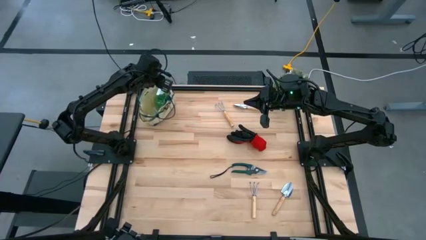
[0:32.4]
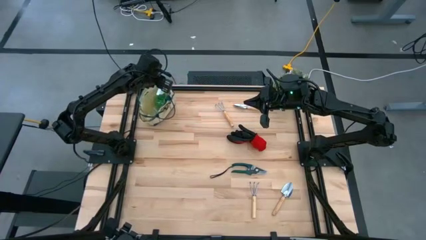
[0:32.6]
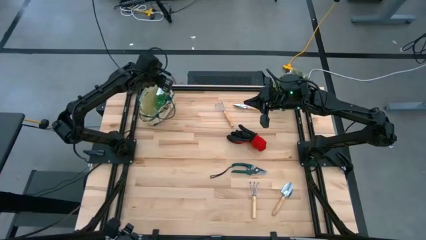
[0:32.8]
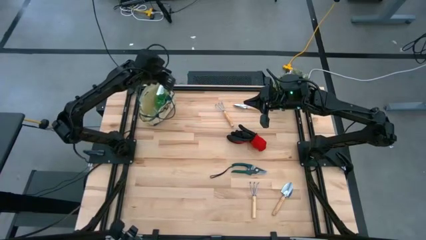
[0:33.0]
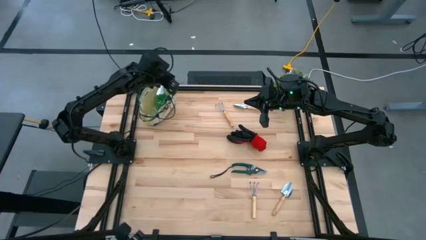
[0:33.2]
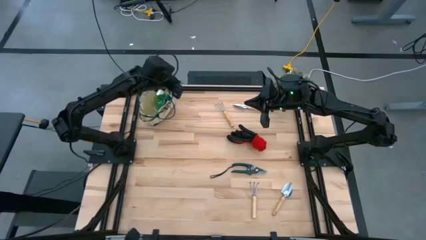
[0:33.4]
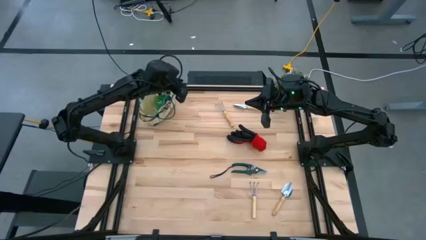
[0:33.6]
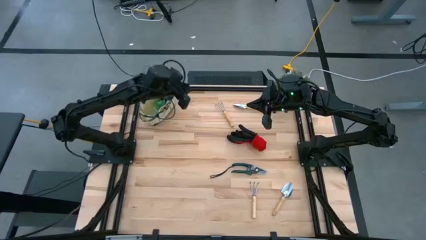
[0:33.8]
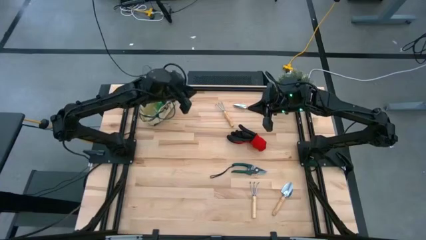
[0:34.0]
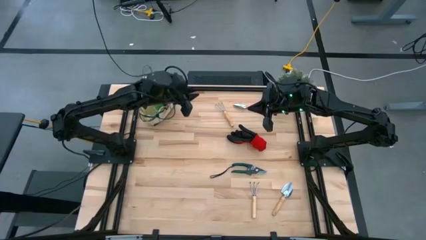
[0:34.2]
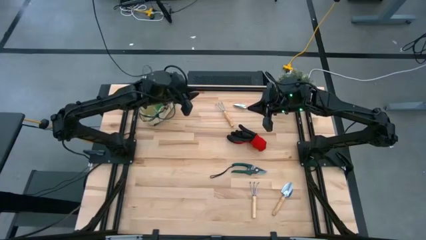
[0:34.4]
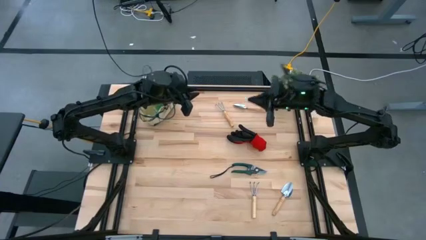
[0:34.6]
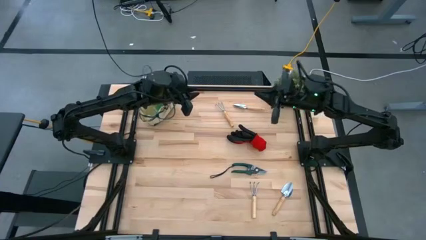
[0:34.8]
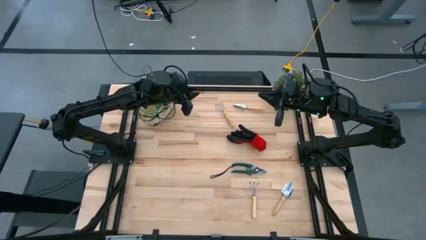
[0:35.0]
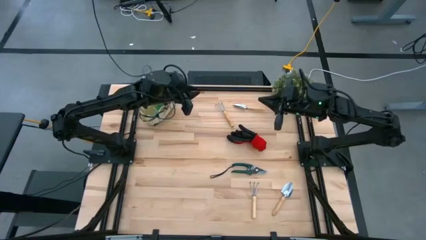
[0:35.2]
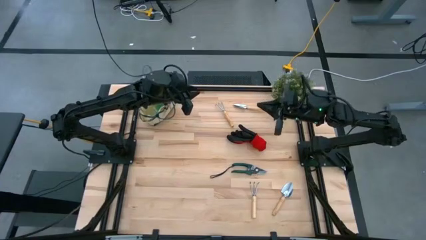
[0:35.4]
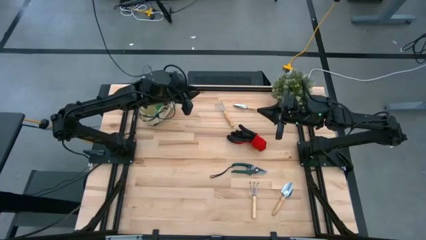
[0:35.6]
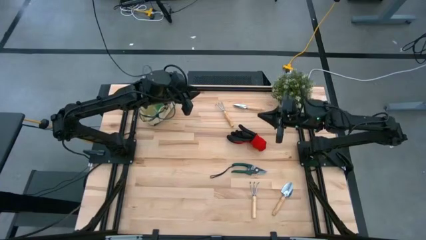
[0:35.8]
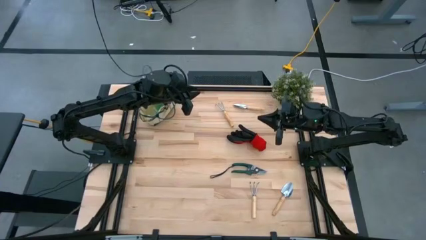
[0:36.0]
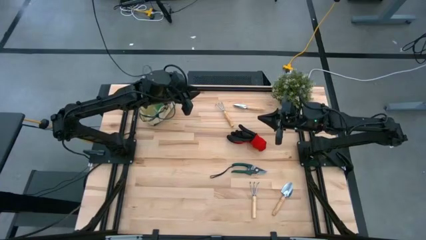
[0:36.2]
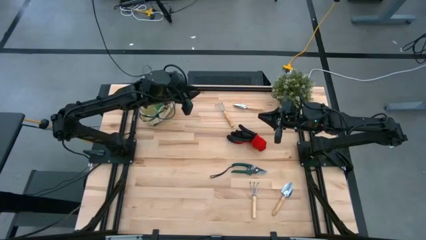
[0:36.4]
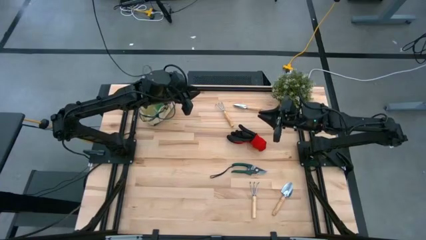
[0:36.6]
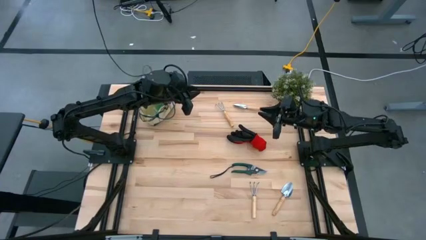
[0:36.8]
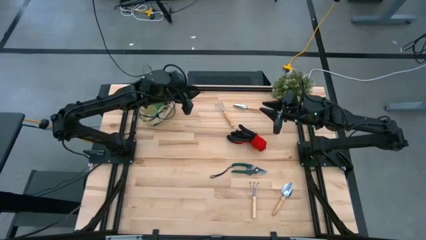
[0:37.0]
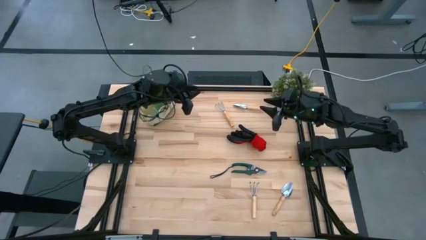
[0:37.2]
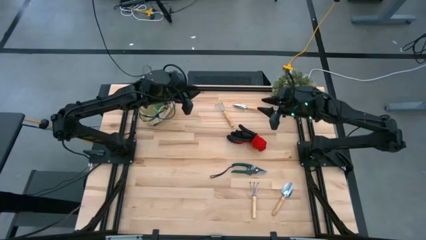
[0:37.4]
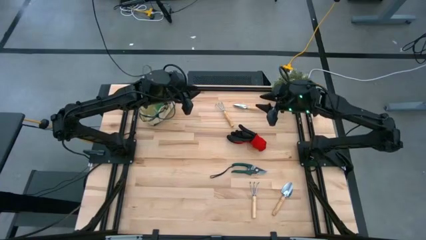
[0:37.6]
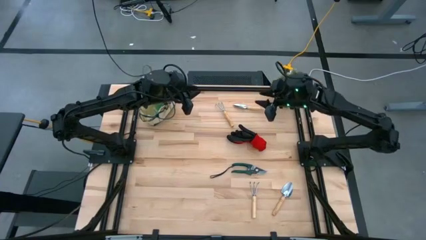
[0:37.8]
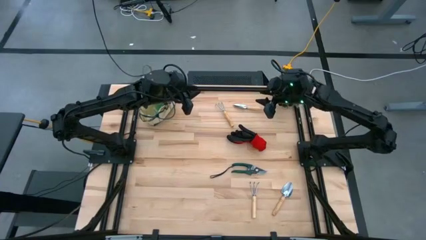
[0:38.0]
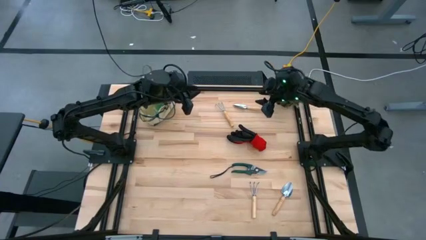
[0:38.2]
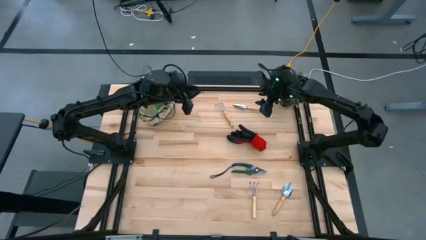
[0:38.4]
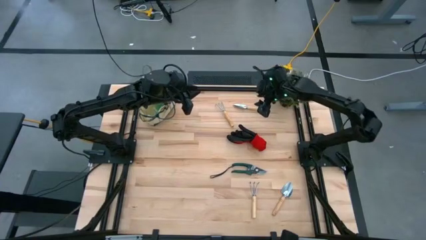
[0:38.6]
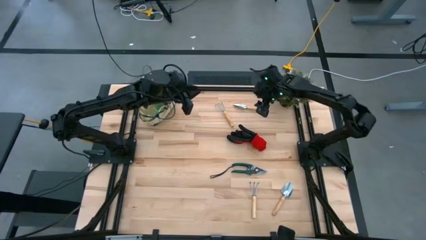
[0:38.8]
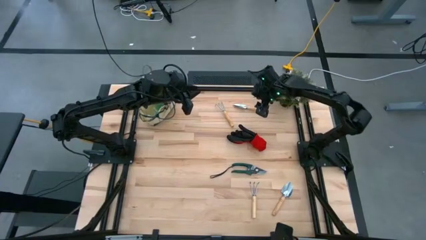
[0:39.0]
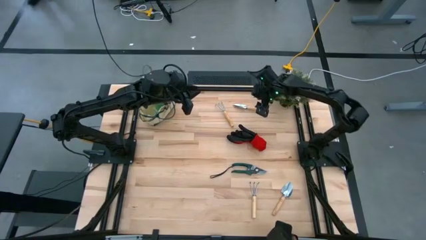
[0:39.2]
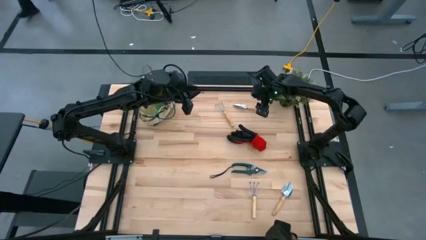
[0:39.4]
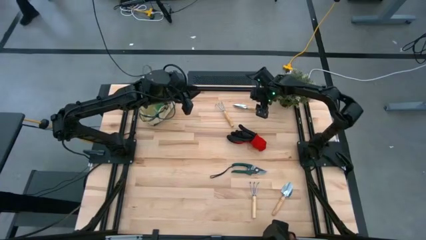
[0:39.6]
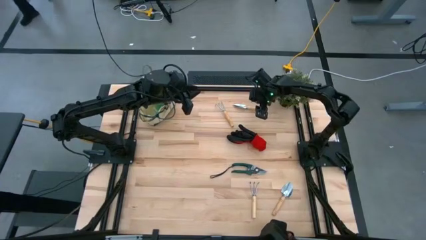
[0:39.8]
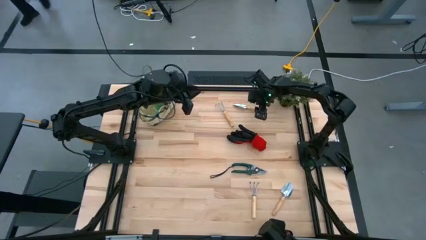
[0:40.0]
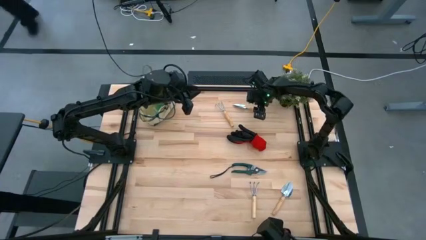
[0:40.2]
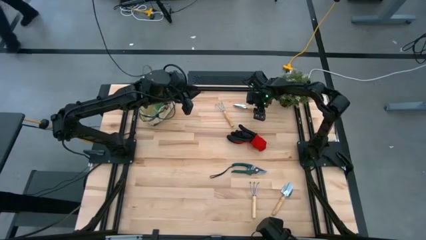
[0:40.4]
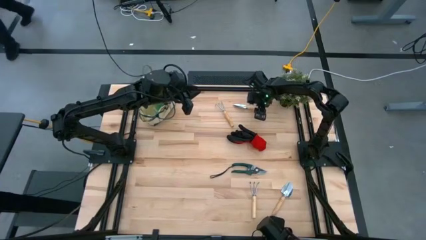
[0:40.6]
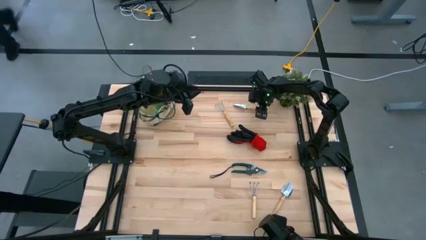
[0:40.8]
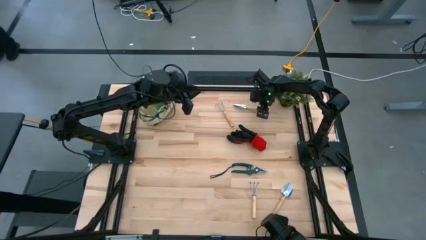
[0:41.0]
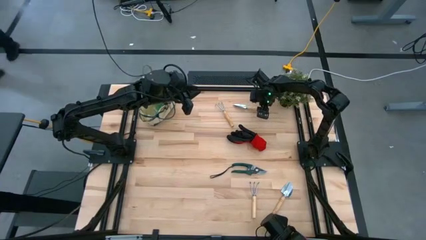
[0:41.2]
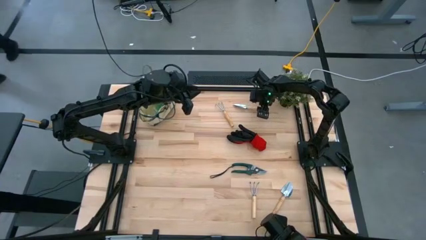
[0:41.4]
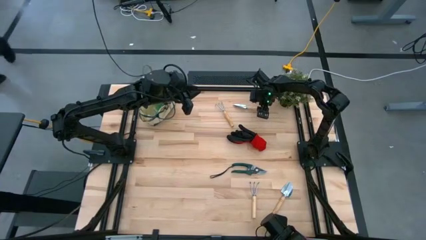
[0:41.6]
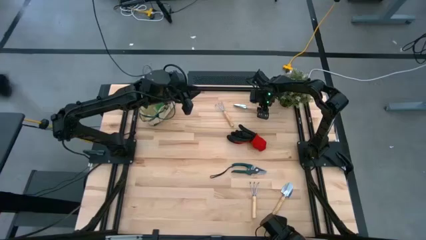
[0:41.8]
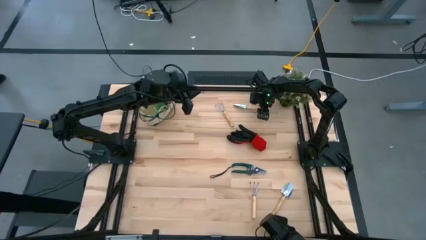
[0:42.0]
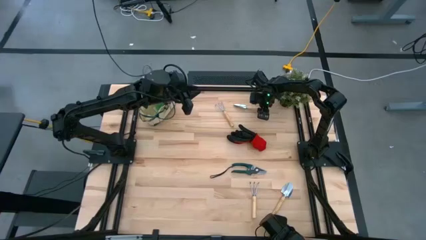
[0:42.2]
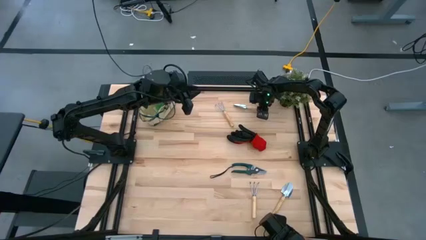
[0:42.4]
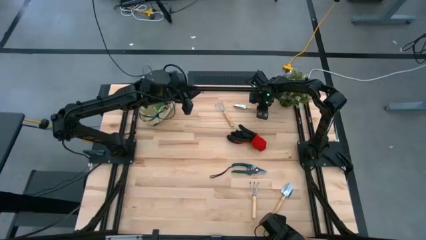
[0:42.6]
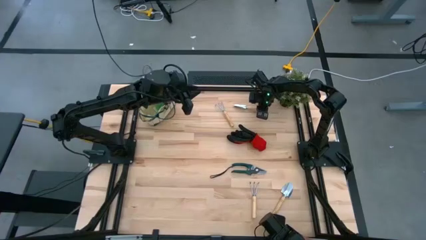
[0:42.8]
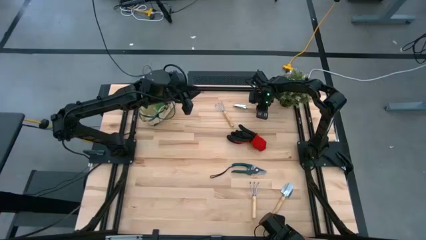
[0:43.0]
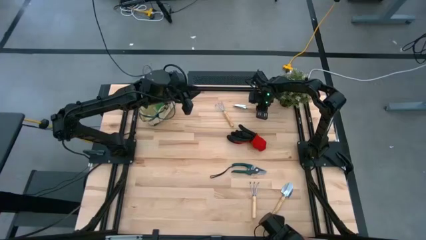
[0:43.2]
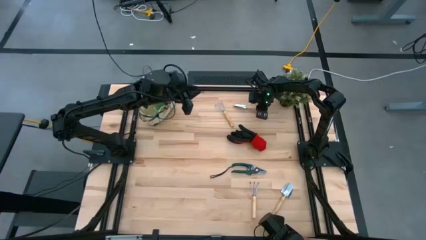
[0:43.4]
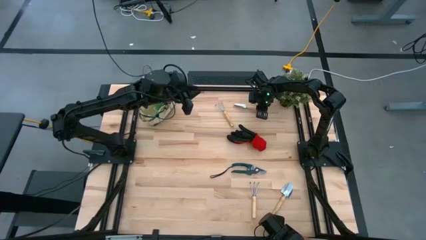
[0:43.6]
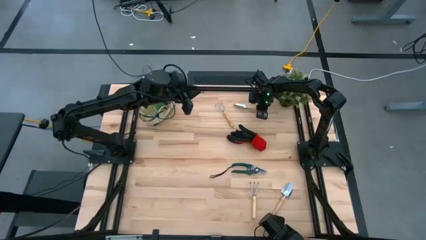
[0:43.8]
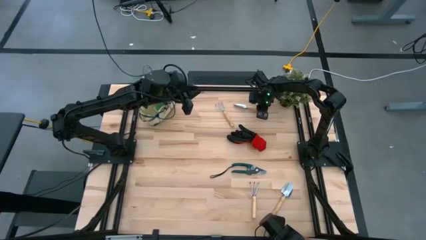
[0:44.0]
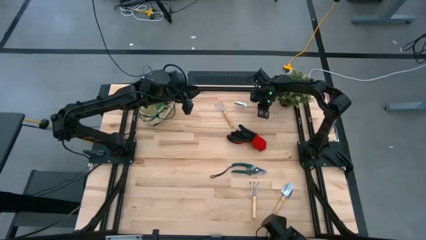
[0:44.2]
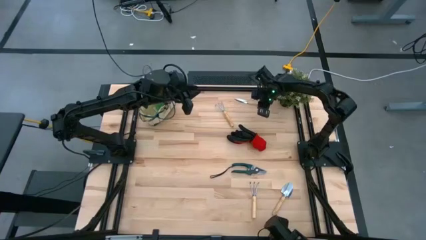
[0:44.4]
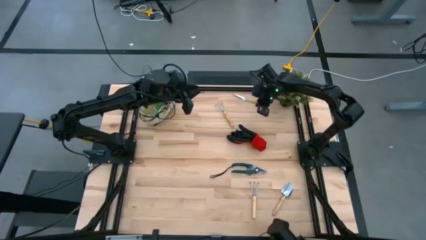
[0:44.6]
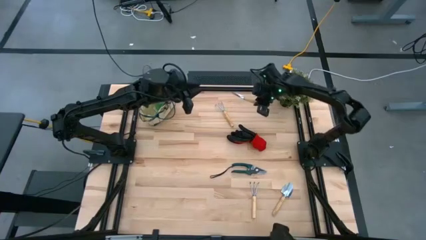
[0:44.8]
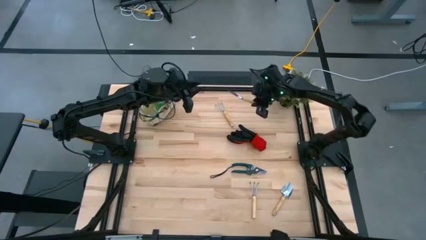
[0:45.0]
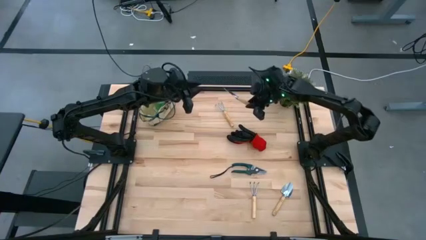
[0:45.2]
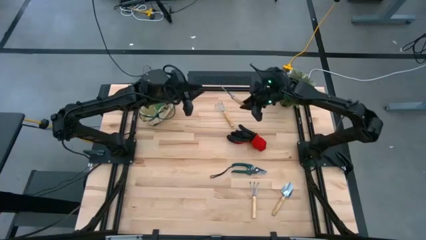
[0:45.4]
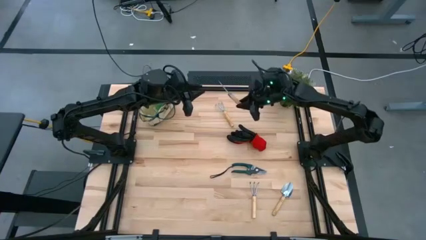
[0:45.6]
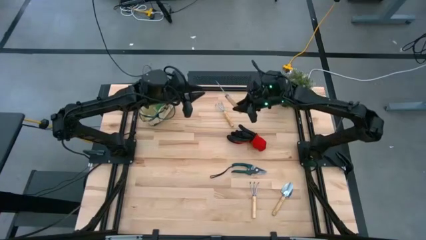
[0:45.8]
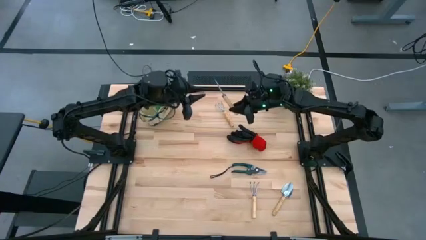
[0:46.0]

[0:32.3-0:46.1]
Task: Pick & Place Garden tools in Gardening bag
Put the top brown trowel into the gardening bag
